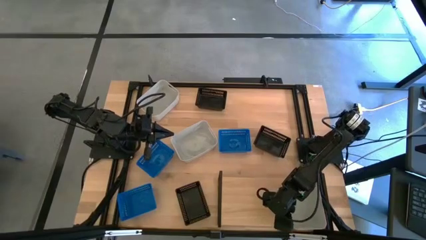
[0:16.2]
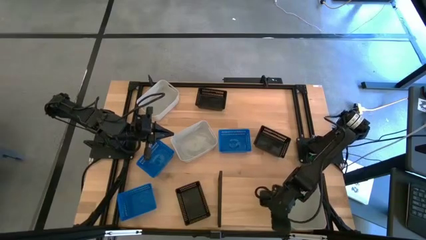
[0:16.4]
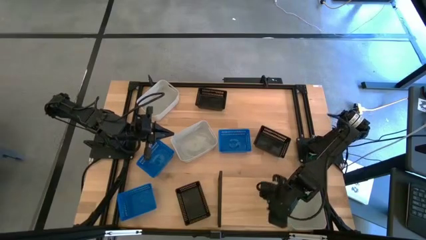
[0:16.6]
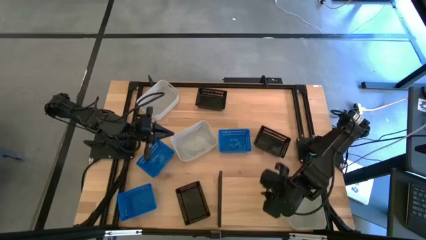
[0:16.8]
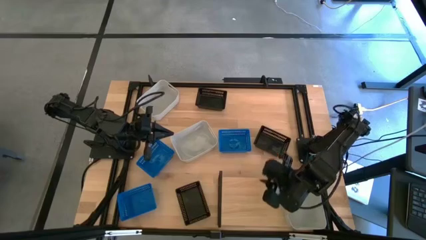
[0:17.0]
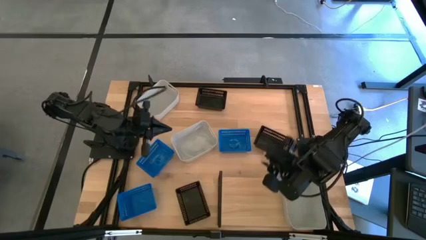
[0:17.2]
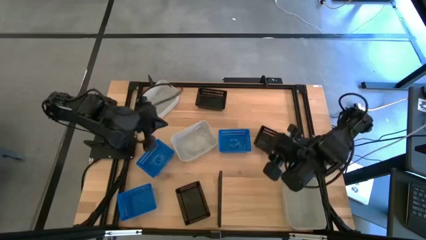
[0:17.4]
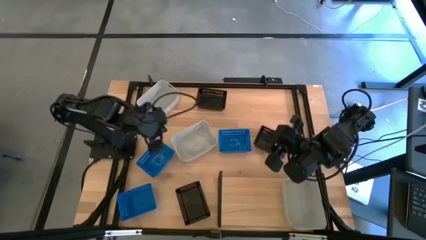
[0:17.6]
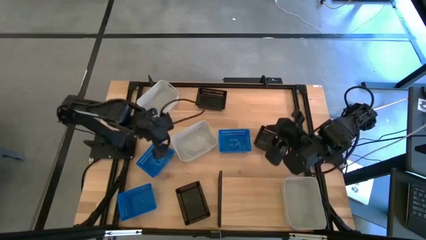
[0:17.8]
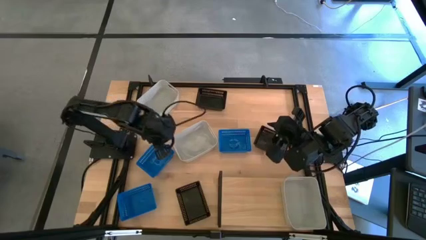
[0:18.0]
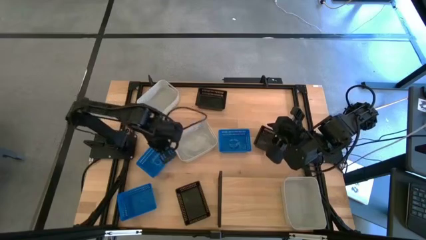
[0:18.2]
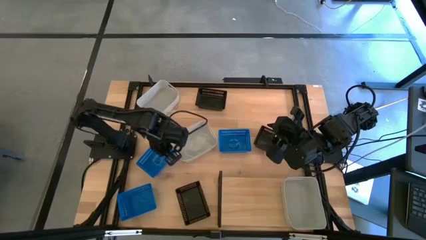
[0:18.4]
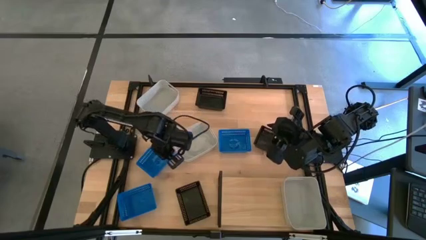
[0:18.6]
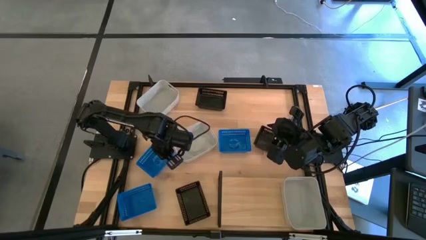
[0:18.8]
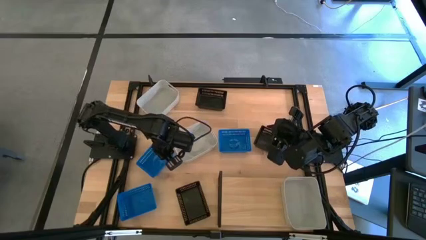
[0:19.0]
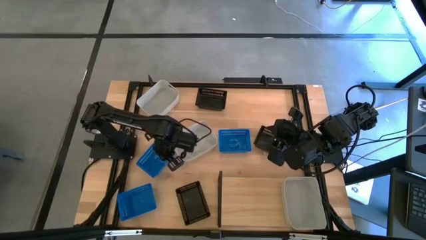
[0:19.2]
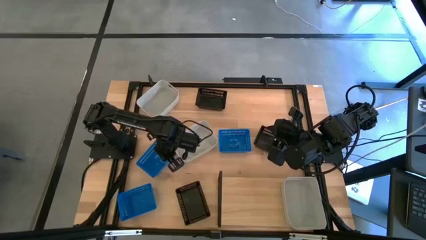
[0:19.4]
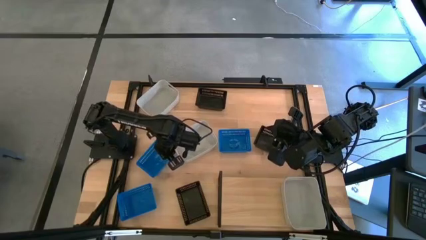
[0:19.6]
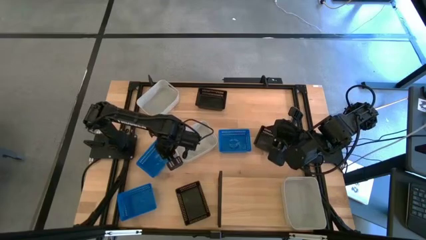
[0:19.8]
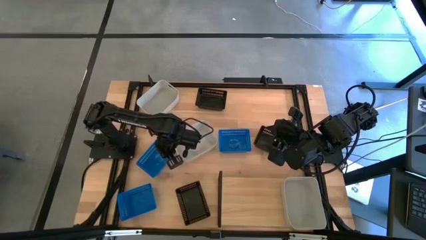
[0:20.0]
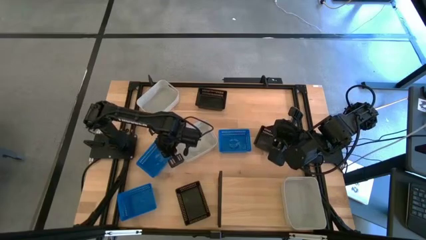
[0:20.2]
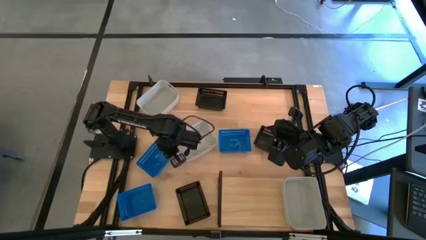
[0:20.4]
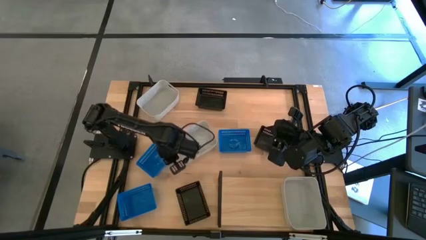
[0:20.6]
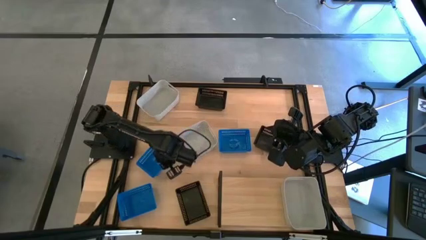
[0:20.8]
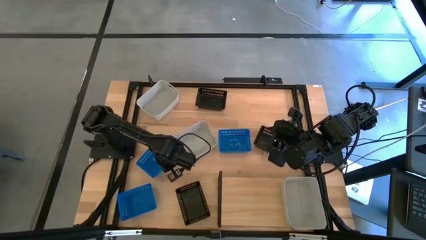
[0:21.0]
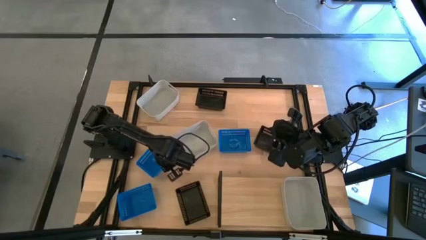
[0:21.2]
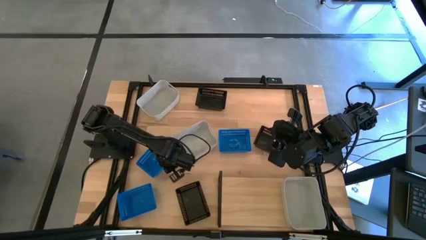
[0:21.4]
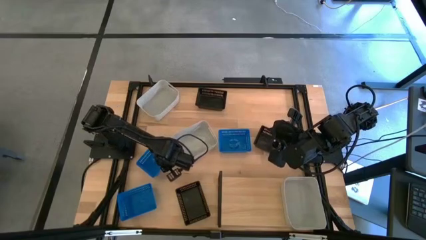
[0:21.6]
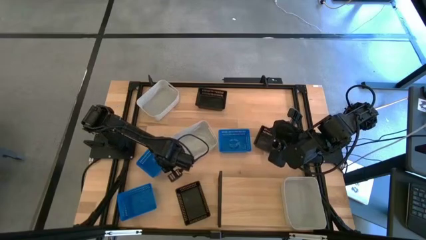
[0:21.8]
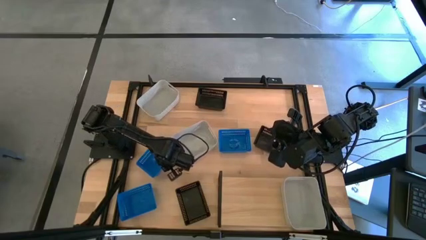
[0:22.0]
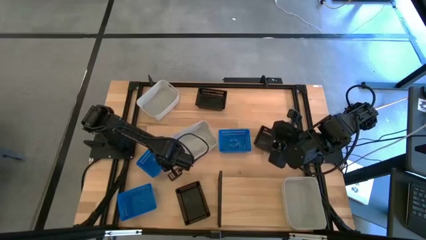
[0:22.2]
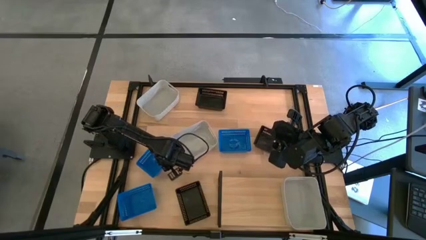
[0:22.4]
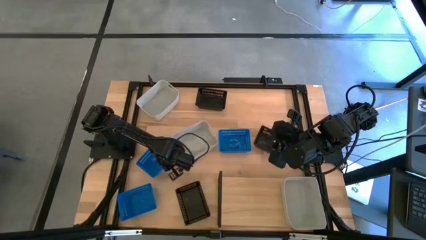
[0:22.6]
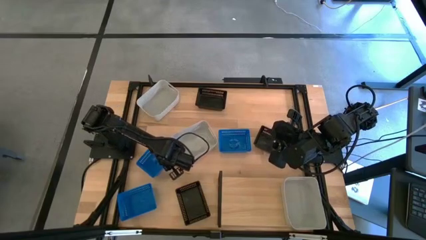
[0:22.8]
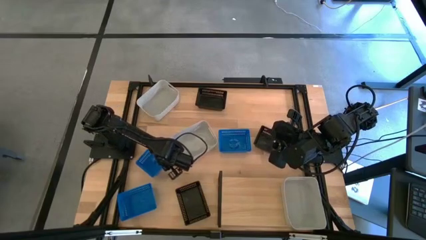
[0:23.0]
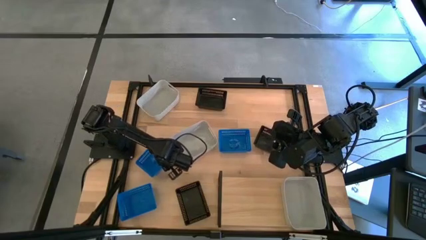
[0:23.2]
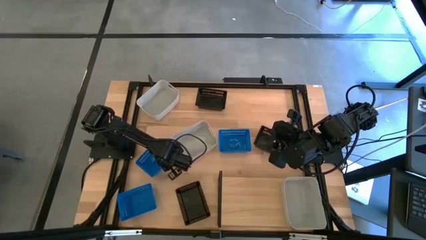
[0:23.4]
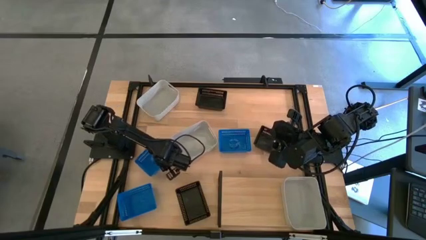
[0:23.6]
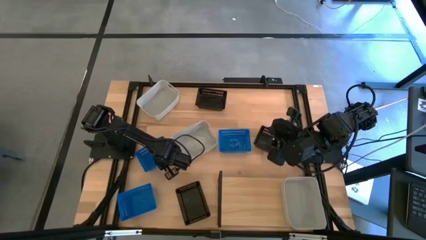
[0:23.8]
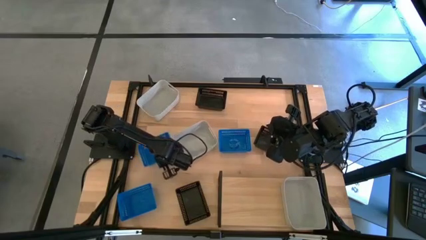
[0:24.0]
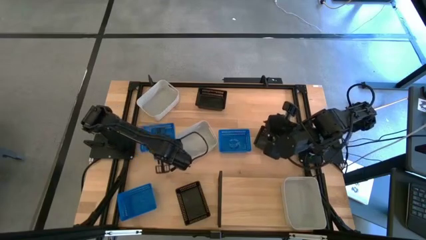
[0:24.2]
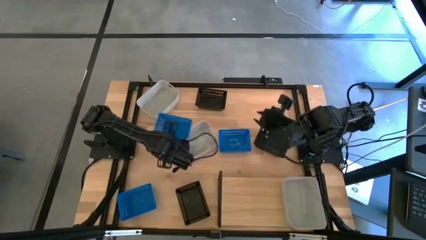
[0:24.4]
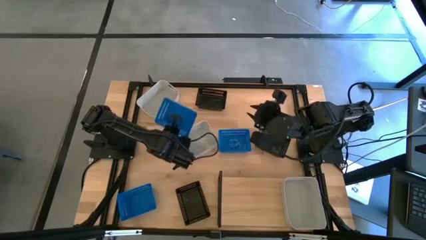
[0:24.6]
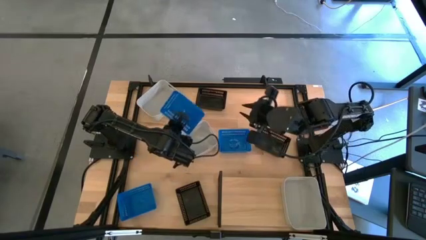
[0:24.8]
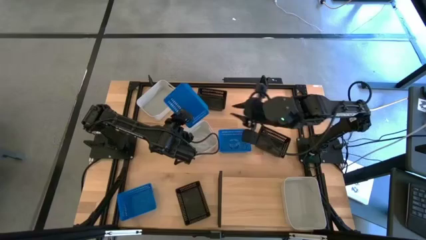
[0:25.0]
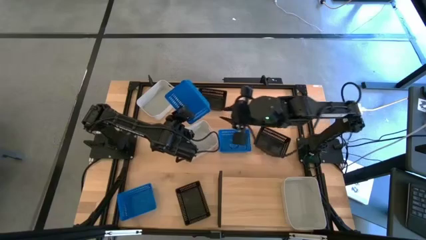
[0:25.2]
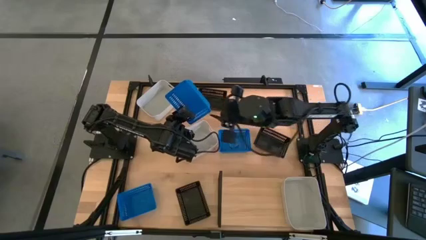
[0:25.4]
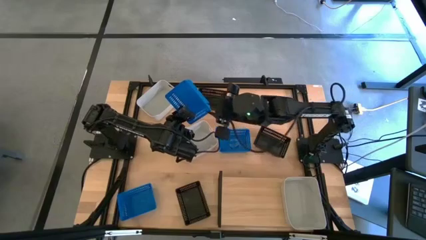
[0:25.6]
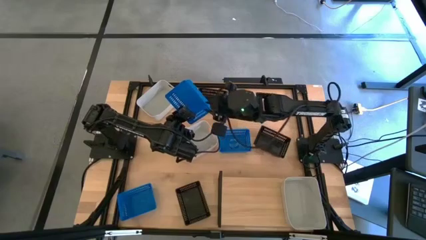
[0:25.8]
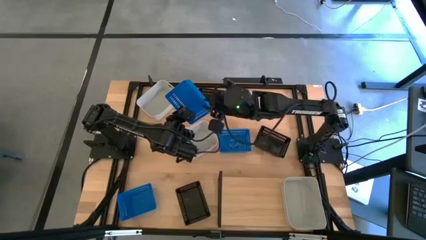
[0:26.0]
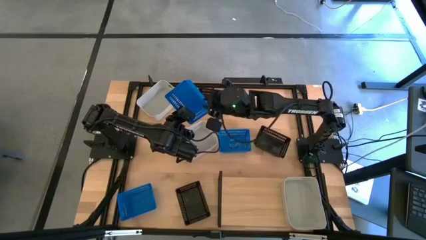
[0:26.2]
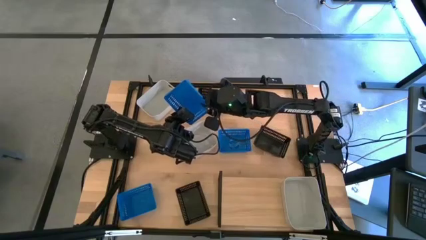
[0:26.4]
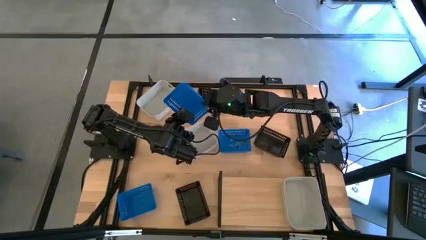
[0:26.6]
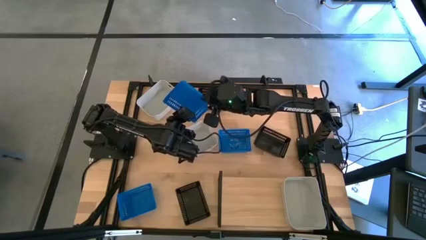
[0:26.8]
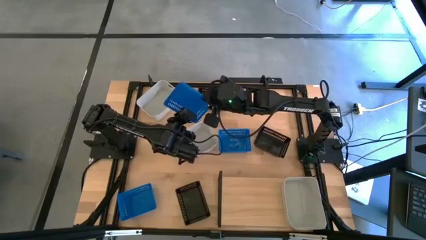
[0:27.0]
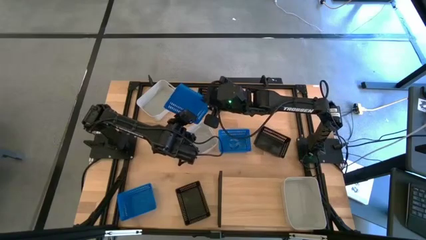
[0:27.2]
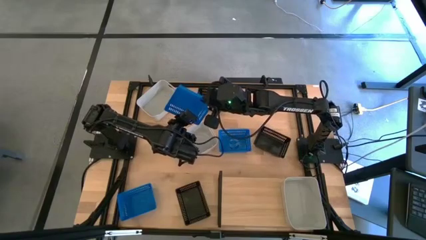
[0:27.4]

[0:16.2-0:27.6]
Task: Stack baskets on shelf by color
Put the middle blue bin on the shelf

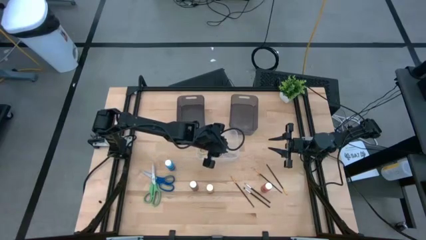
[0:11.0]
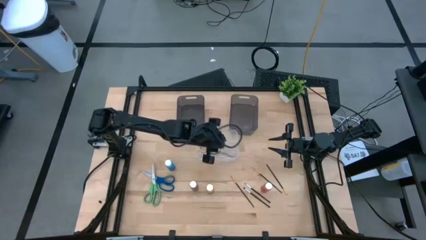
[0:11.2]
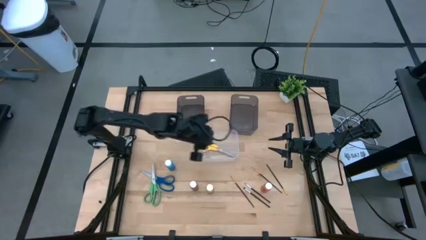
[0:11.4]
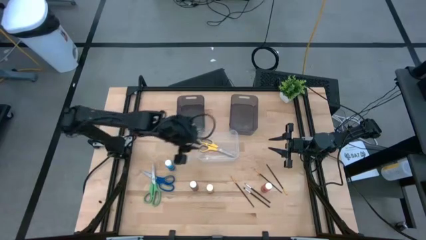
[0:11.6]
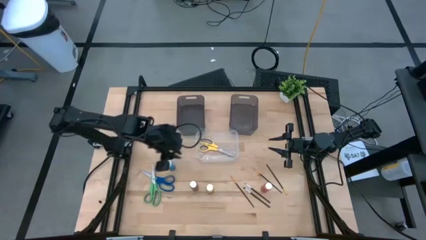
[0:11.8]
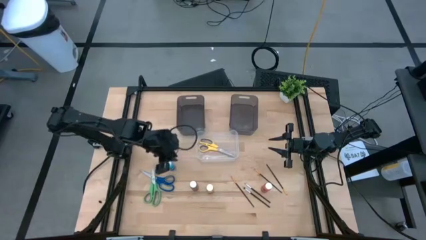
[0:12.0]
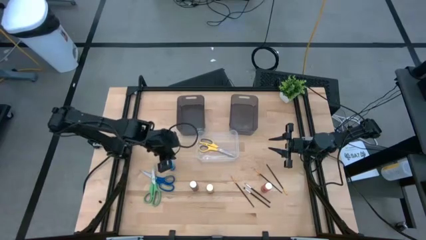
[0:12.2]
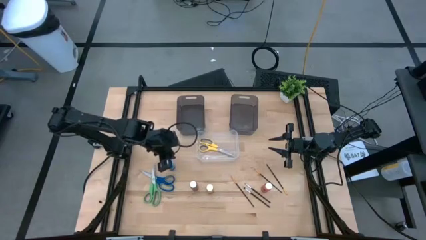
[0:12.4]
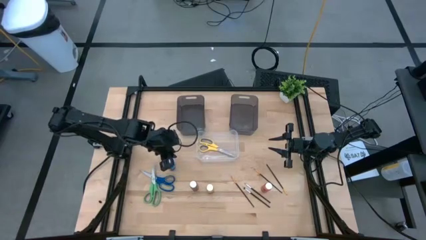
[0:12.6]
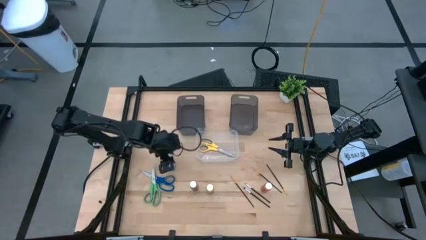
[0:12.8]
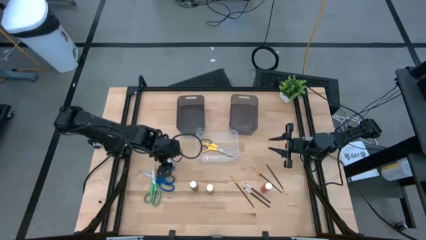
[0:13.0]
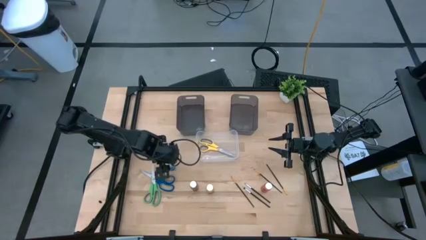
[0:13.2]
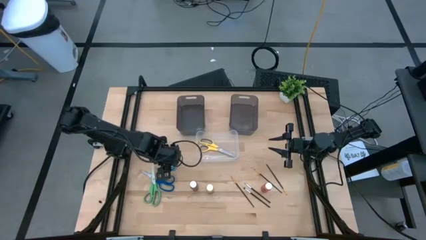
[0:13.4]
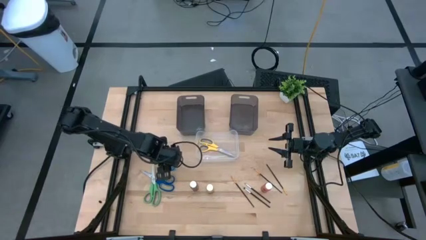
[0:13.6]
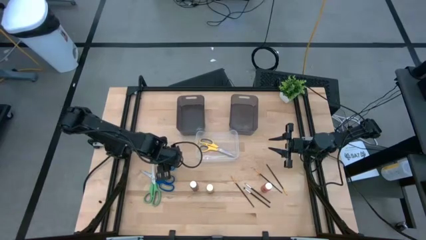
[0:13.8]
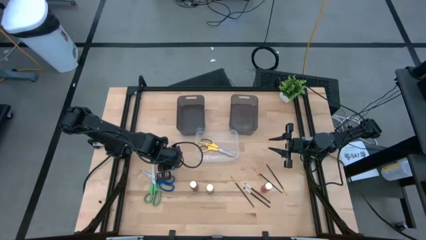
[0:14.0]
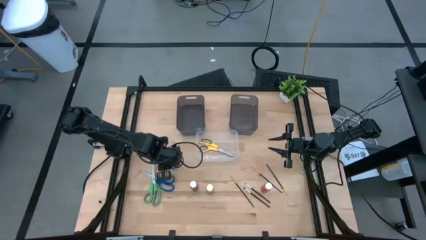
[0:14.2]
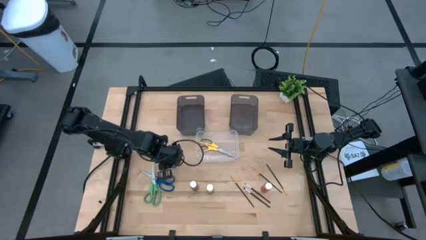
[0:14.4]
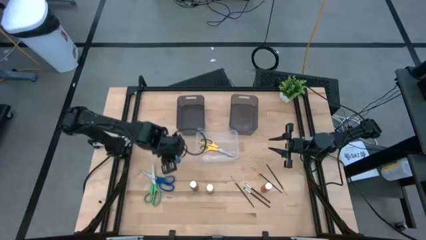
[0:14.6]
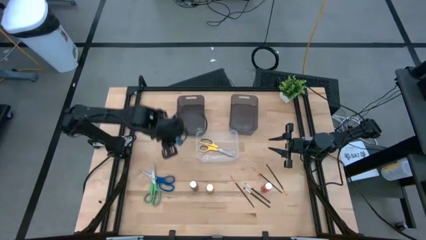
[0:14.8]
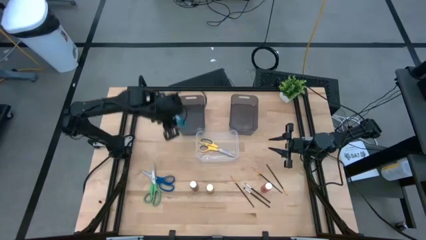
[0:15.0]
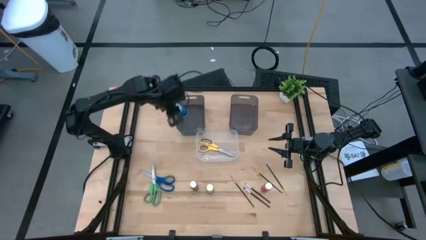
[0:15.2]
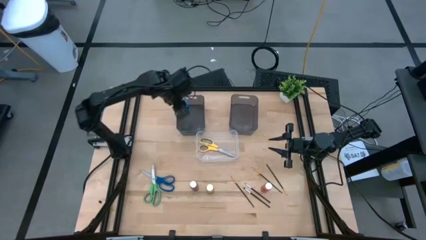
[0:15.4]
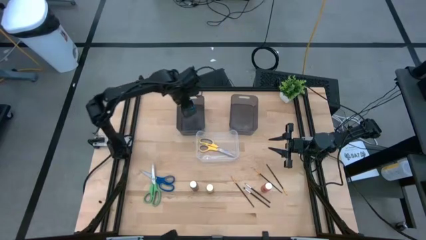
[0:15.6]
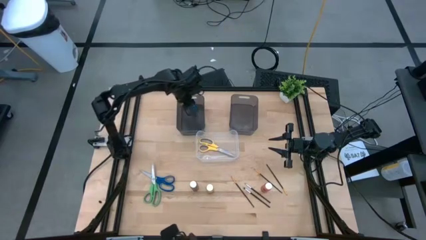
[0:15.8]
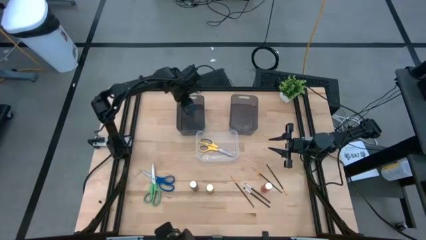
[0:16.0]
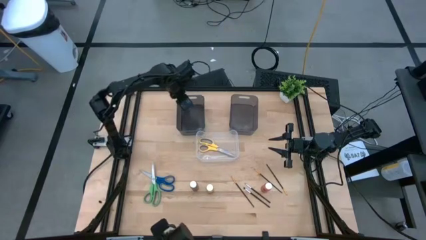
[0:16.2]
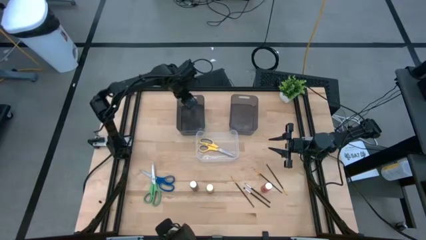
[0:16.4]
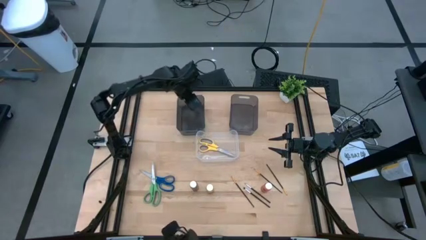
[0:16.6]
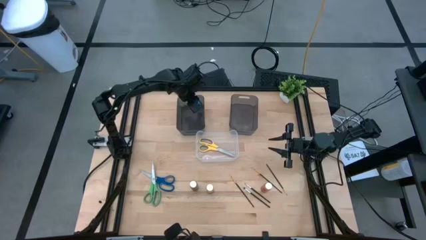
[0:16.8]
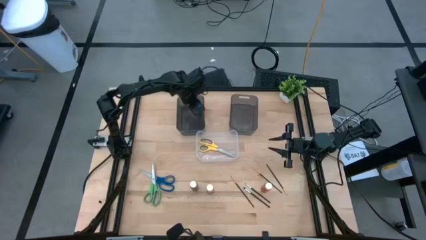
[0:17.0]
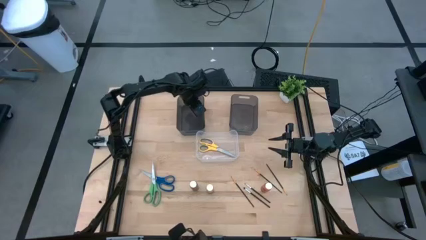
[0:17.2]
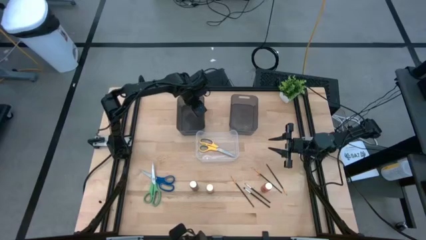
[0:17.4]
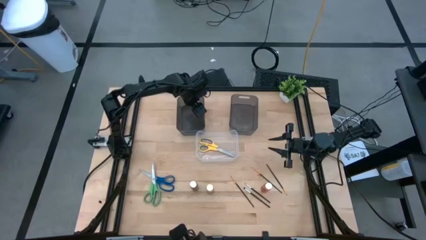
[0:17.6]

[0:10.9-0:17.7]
Task: Pick & Place Paint Supplies
Put the blue paint bottle into the left black bin
